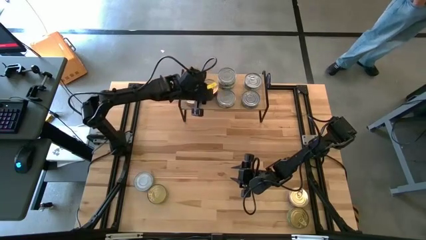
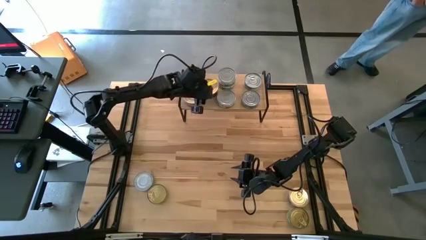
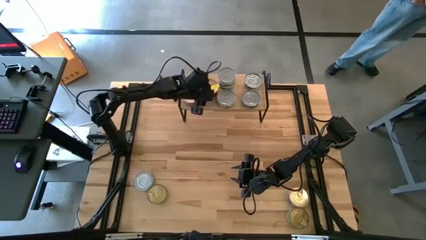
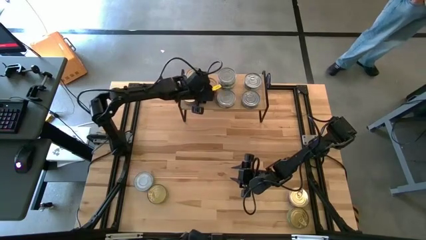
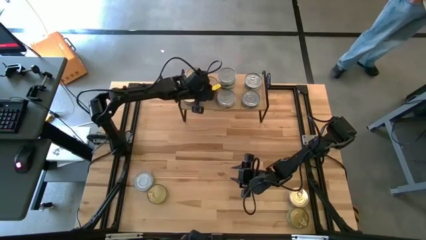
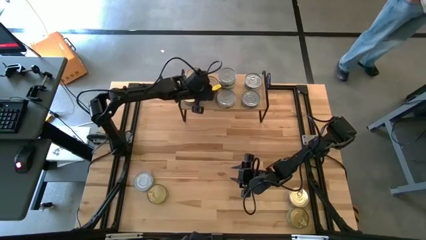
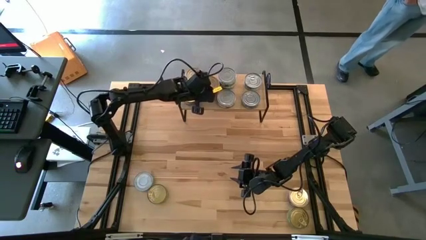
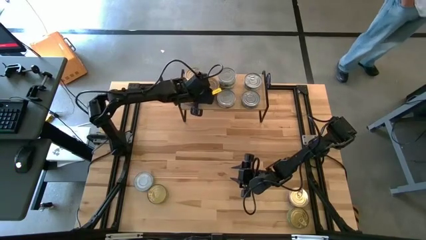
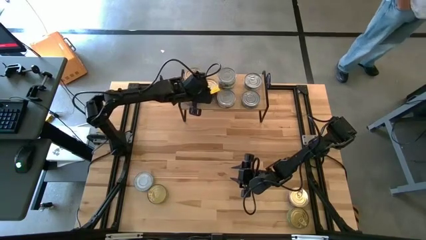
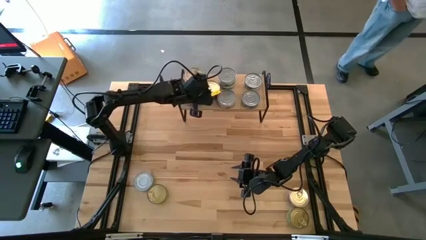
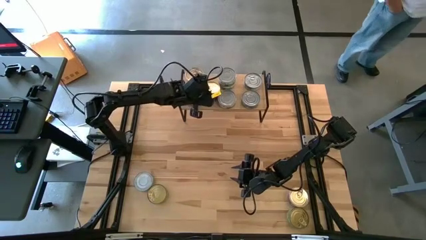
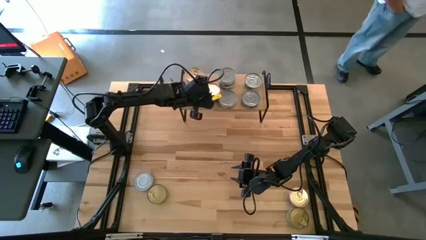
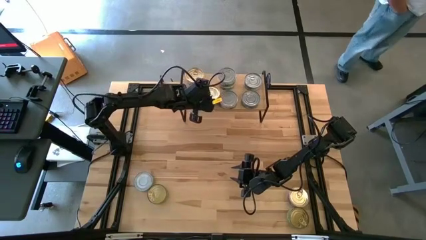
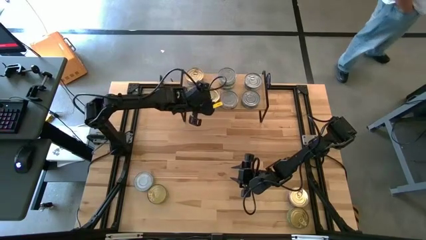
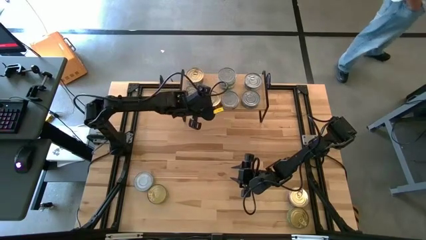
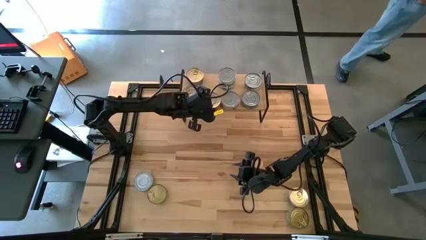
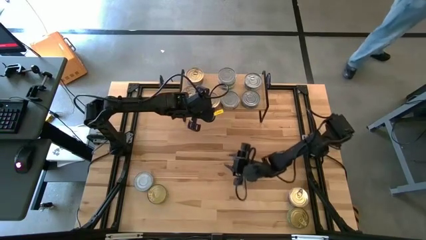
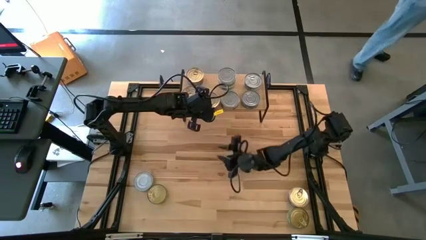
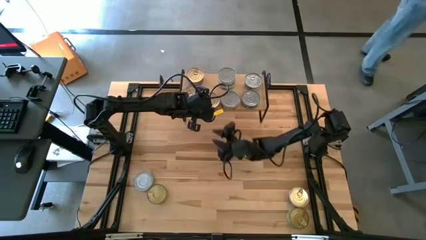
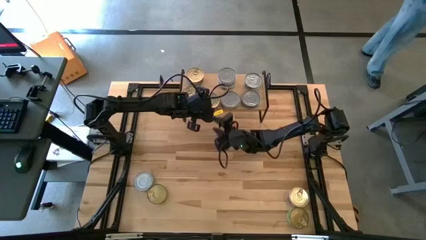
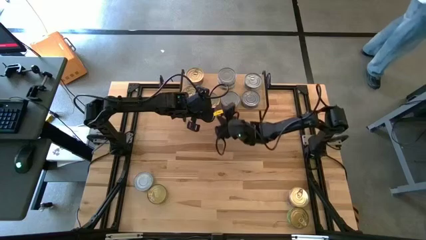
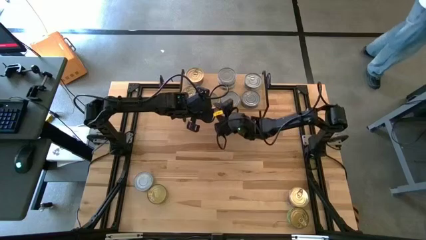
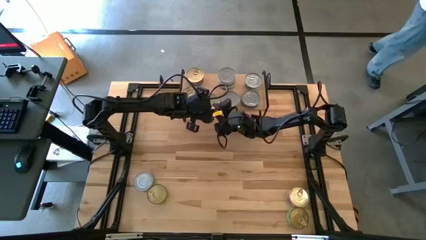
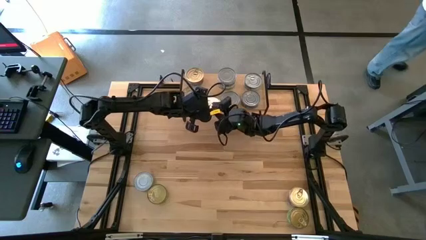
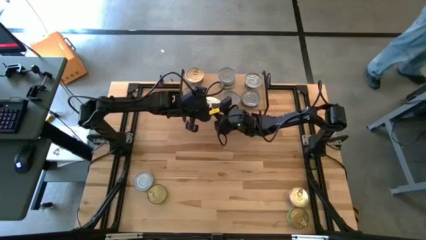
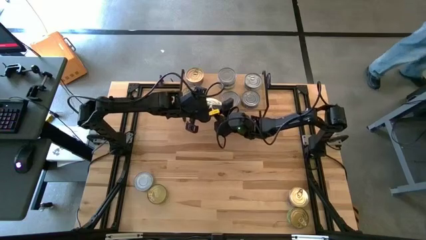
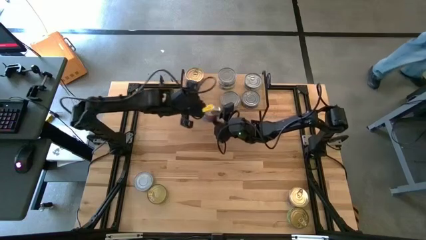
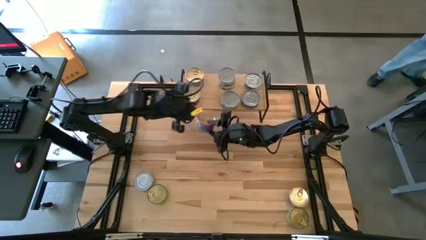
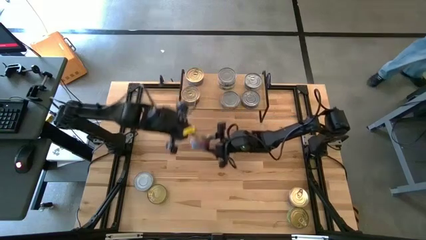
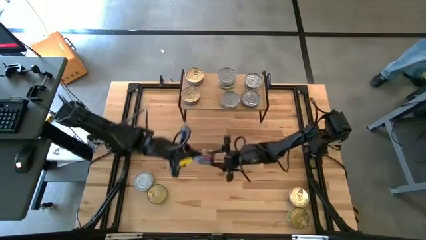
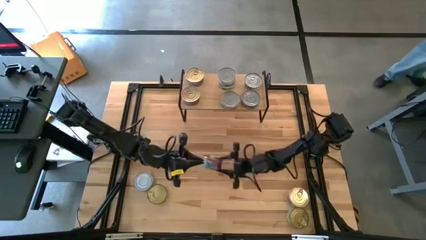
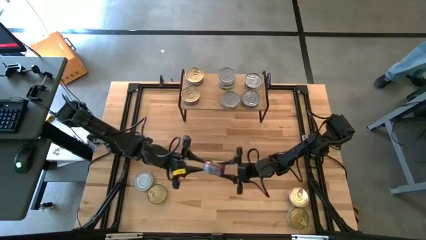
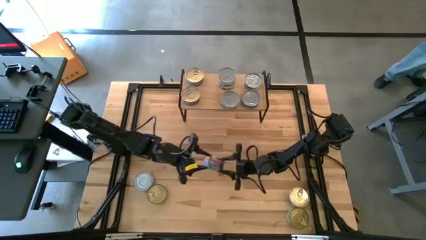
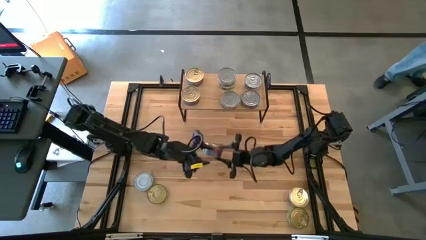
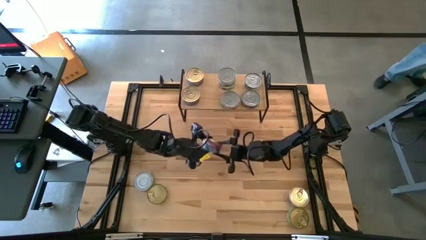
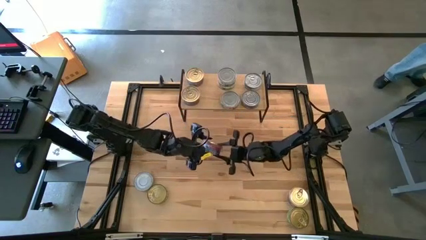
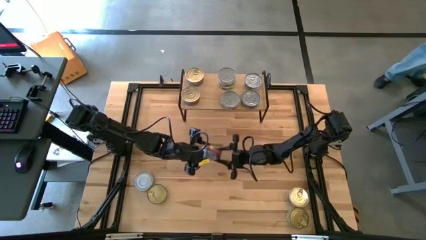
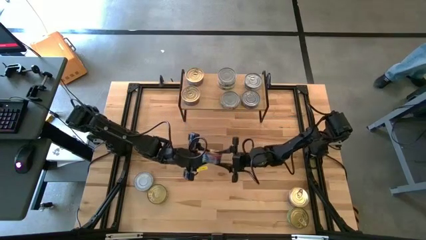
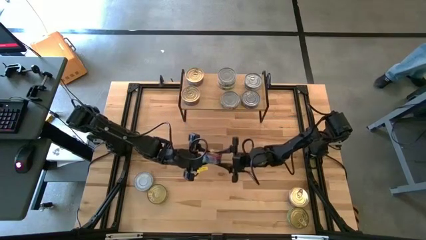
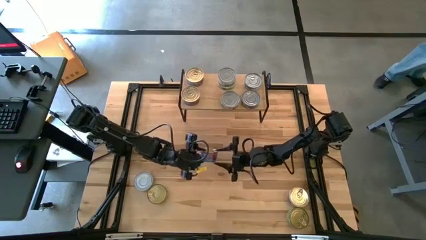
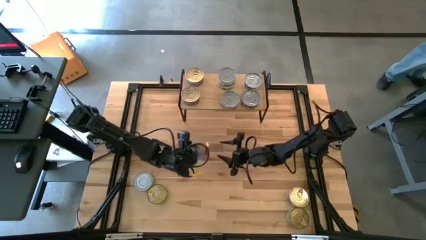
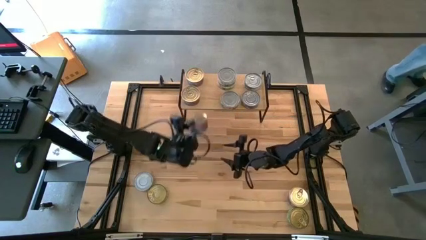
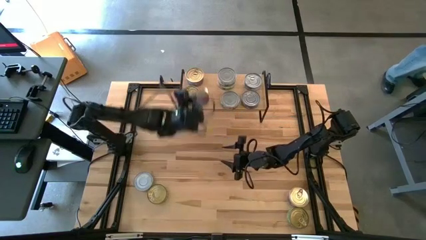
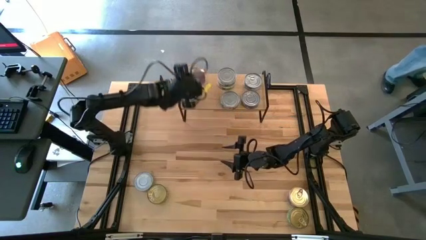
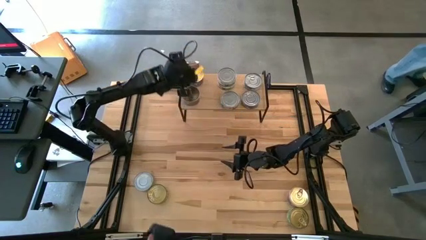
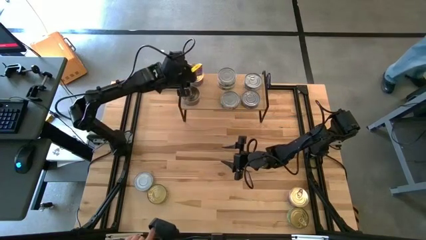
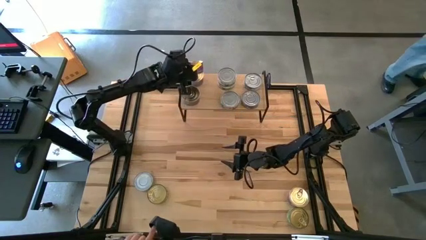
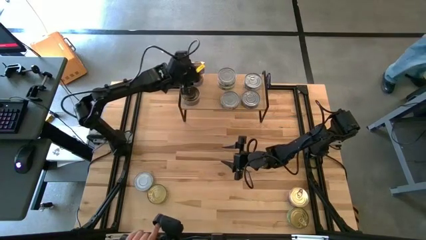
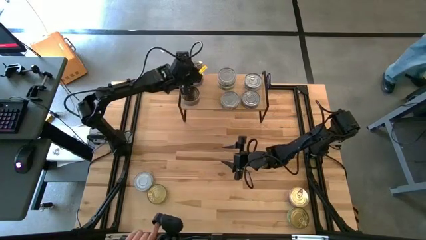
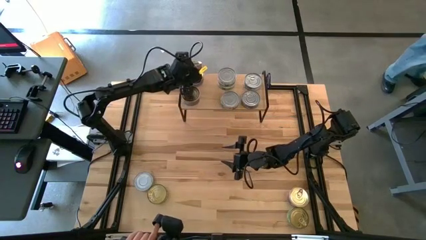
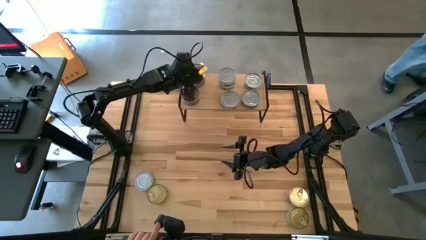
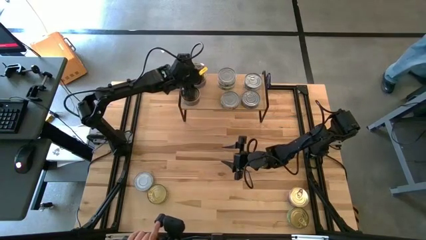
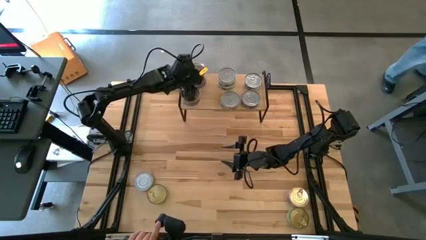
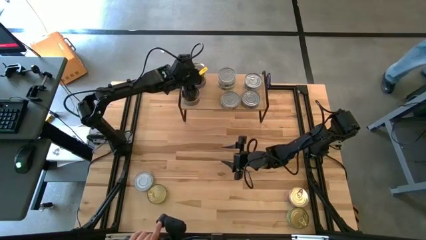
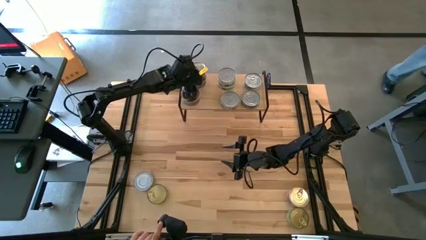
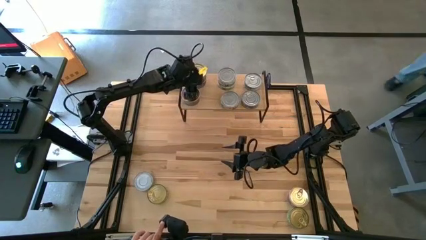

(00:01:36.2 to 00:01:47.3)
Task: Stack canned seafood by type on shelf
Stack the blue pink tuna can on top of the other blue pink tuna can on the shelf

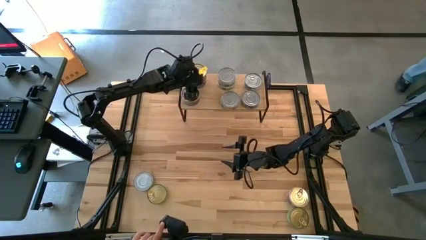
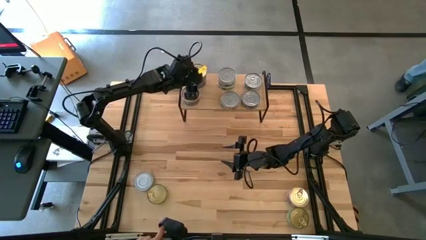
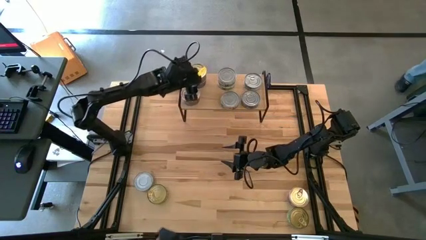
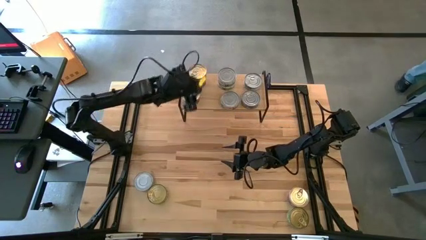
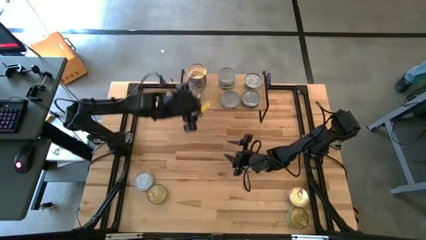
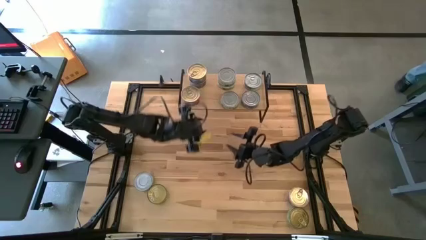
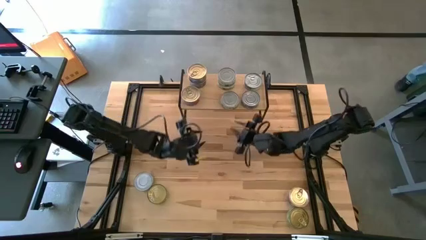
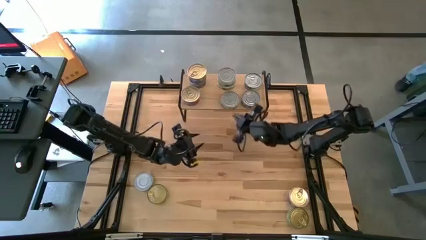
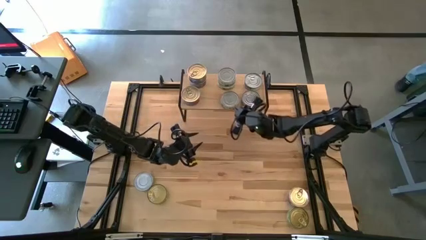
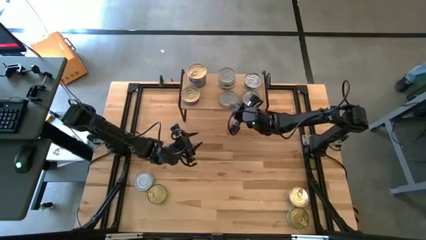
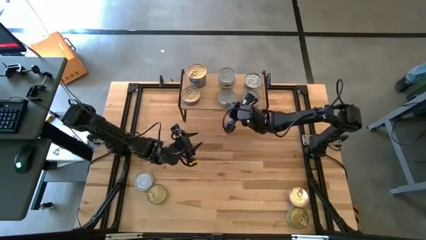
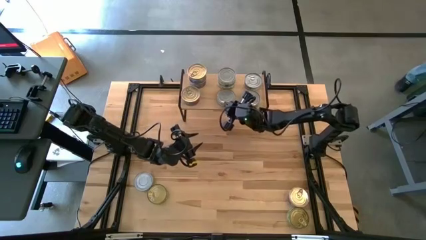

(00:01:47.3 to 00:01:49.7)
Adjust the green white tuna can on the shelf

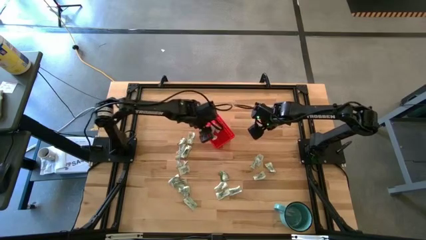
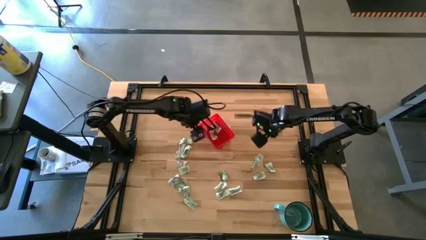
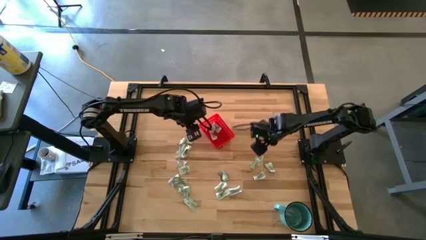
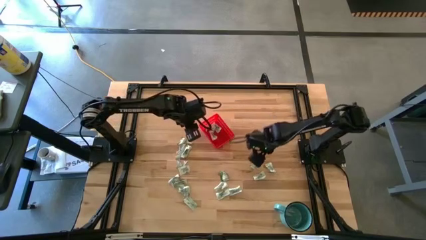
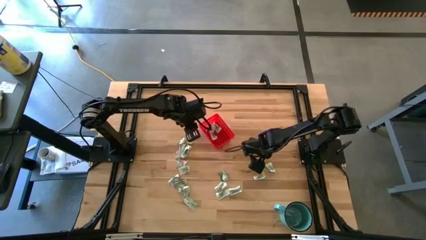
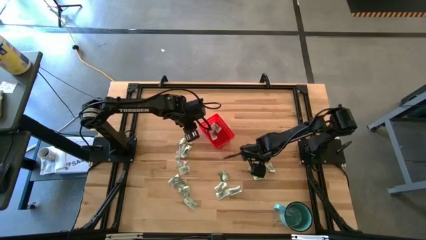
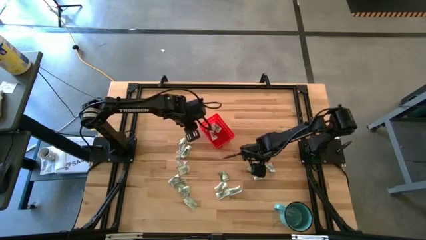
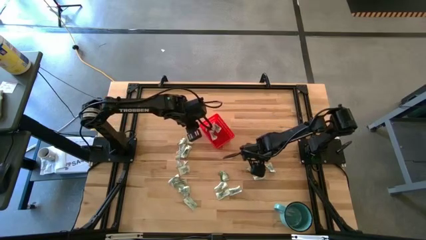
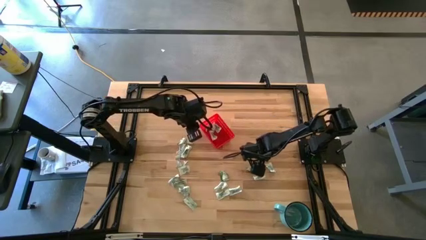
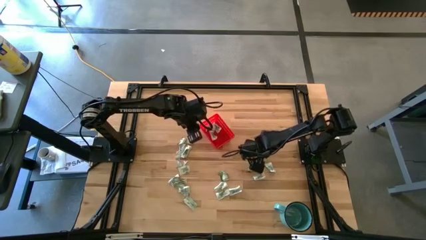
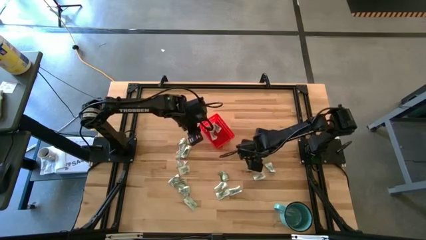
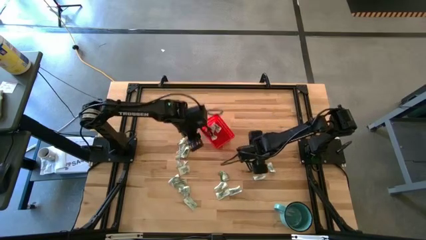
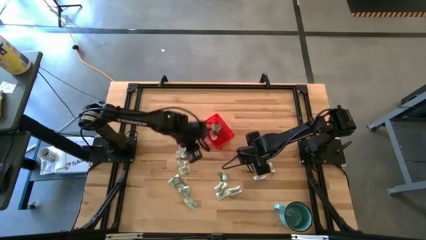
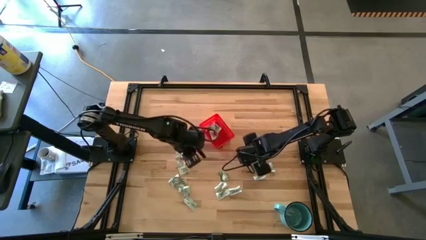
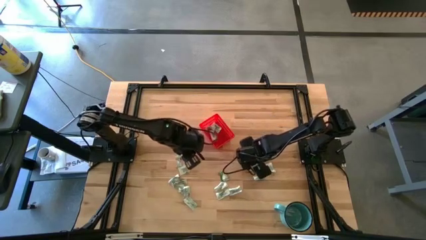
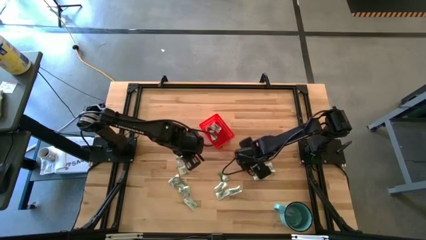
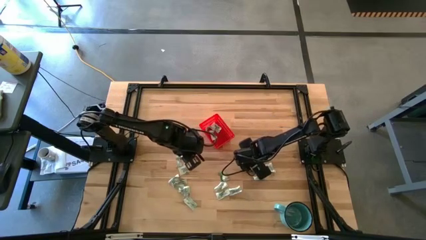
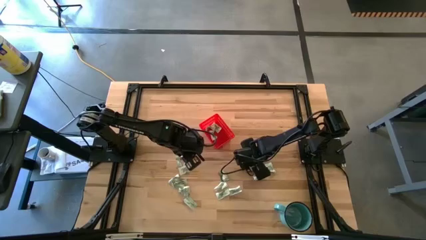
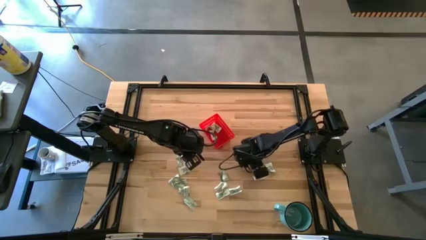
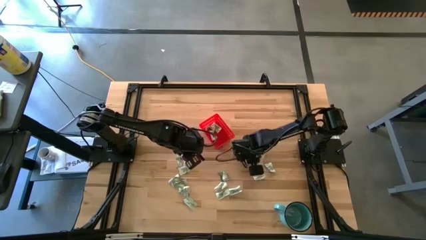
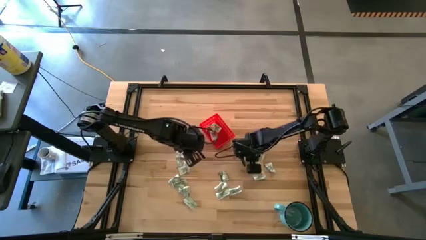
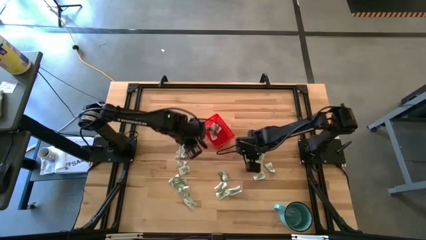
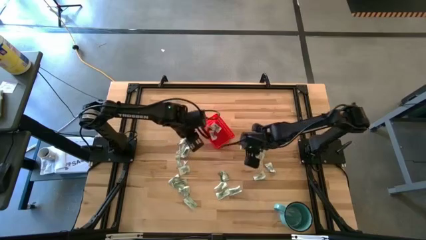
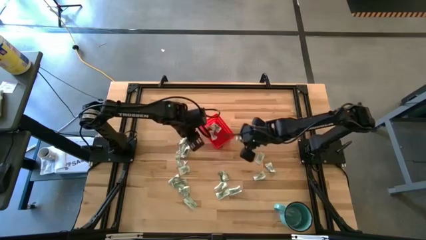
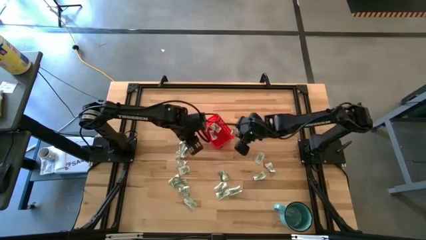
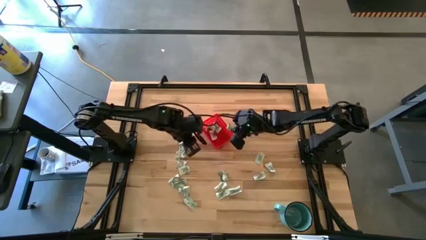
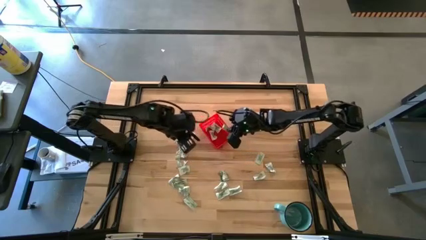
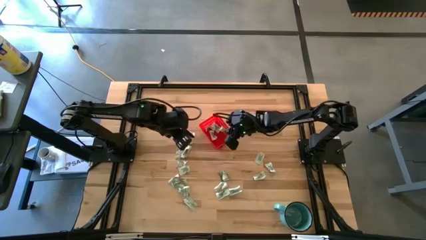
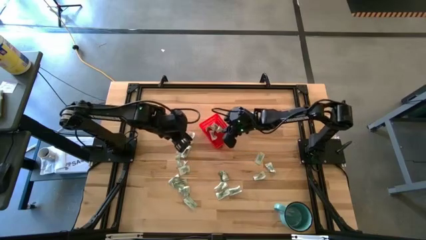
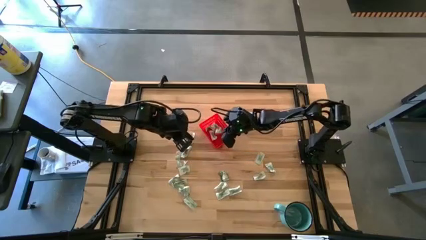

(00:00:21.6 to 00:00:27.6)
Task: Pick and place Stevia / Truvia into bins
Put the stevia packet into the red basket
